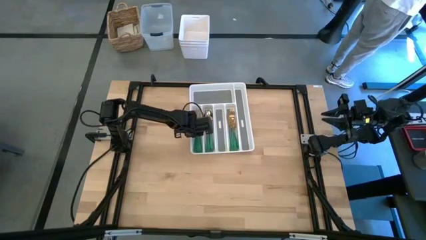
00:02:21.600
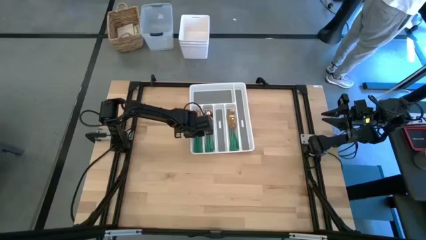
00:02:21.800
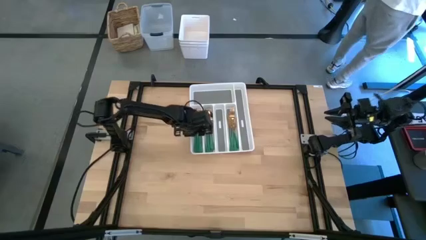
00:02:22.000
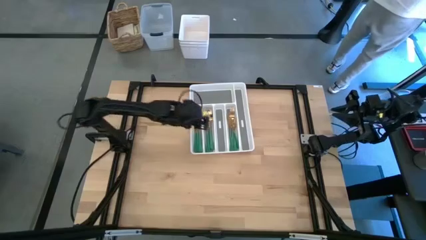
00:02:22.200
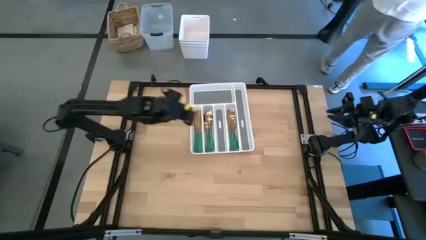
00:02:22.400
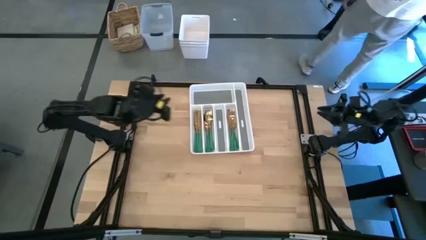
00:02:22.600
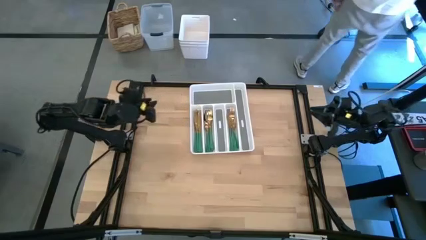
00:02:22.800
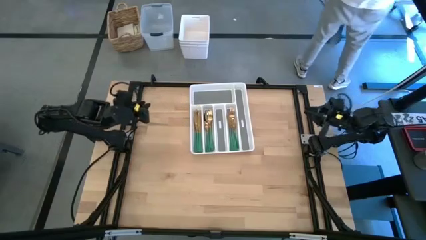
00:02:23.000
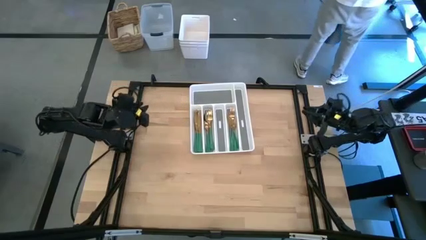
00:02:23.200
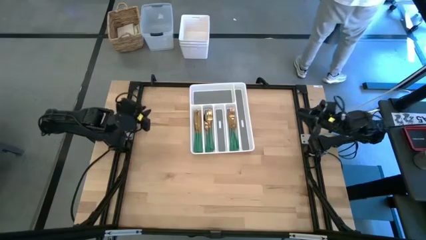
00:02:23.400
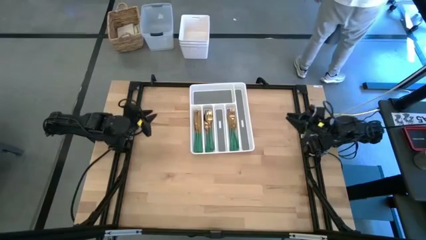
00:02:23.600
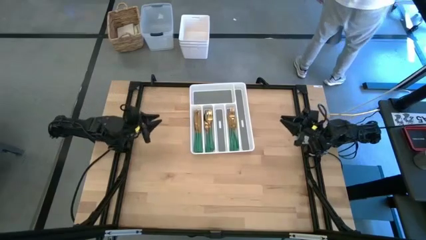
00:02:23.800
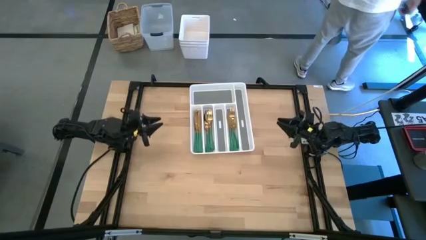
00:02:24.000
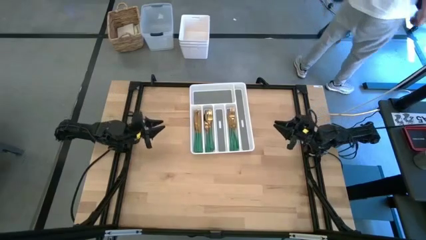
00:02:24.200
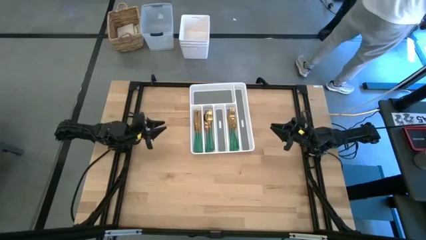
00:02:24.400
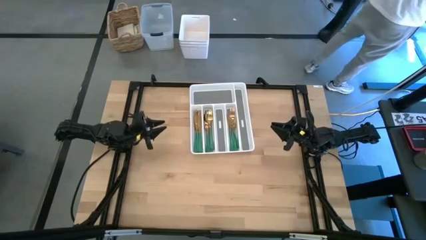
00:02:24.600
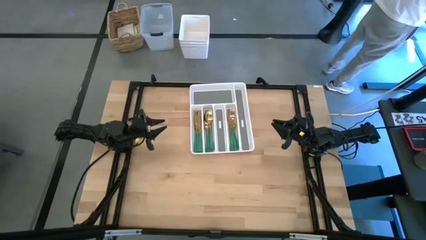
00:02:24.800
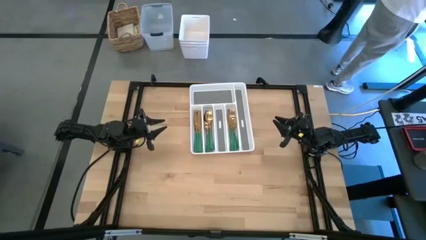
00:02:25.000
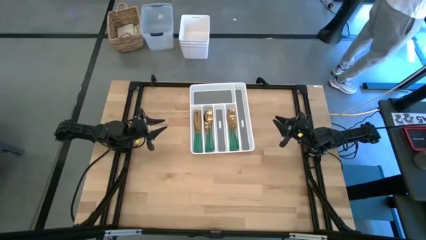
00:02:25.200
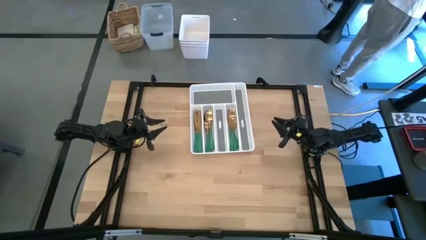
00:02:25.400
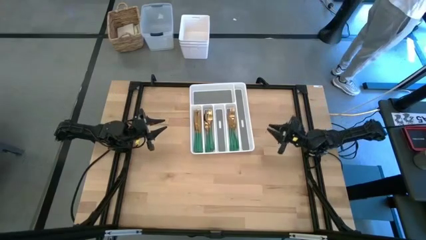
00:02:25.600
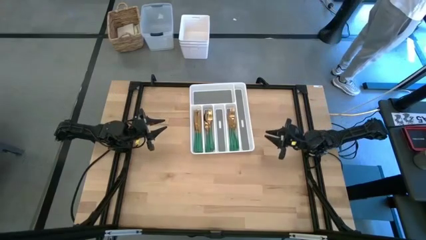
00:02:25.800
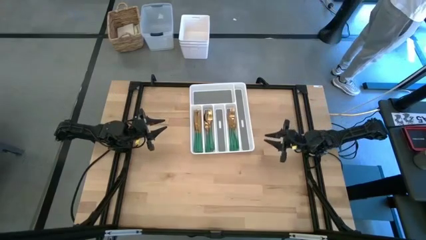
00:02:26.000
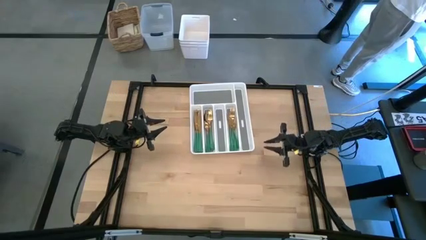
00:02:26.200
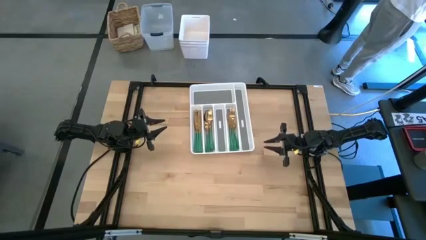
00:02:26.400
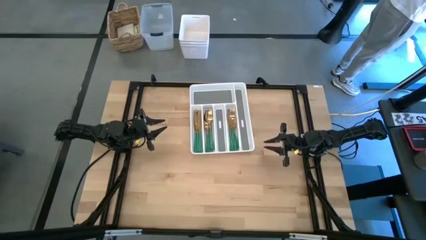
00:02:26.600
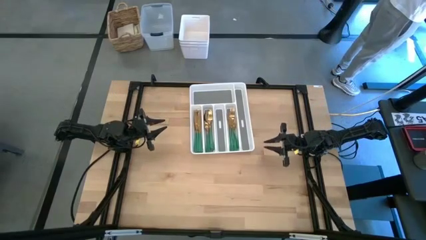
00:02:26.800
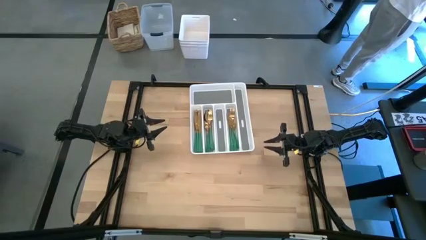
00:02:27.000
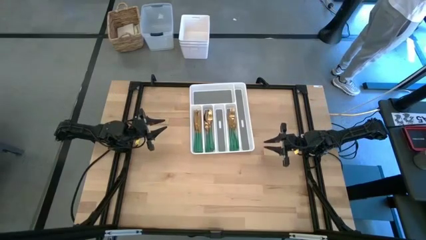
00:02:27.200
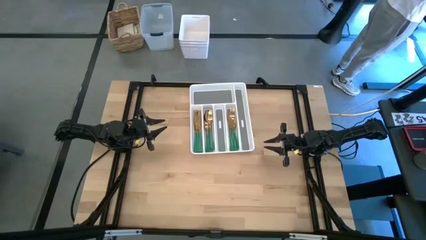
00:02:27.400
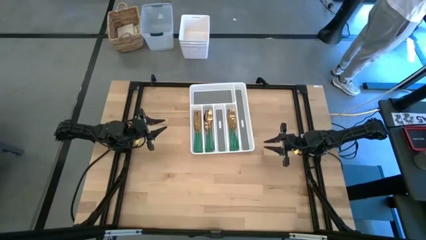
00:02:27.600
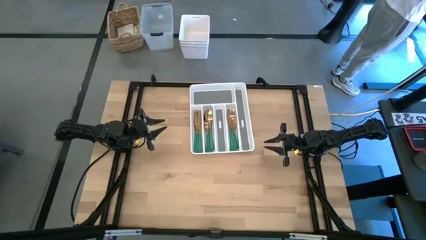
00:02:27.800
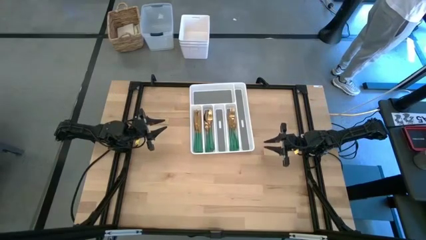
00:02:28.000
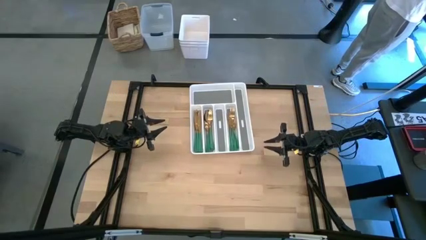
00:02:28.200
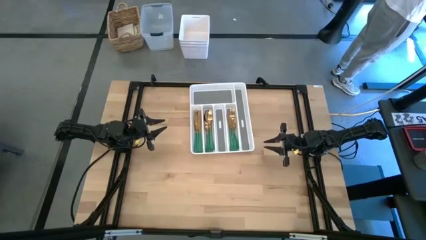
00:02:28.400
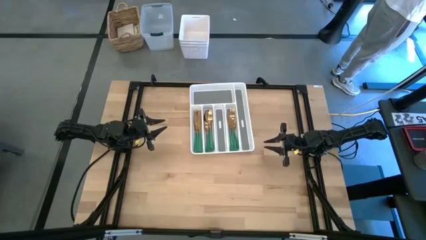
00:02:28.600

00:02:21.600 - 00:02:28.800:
Task: Sort silverware
Return to Home Position

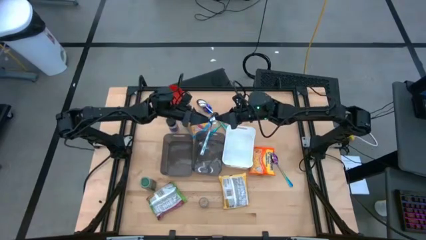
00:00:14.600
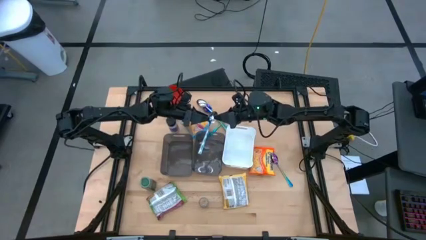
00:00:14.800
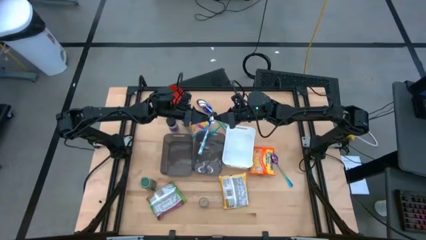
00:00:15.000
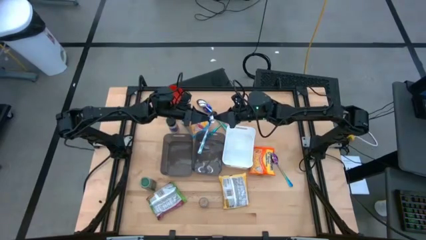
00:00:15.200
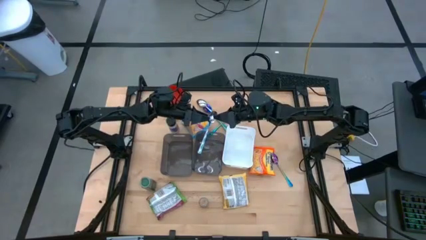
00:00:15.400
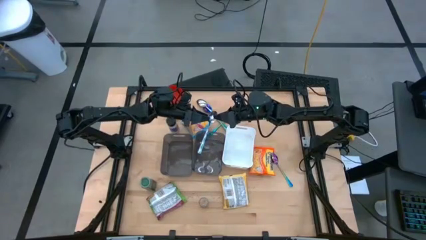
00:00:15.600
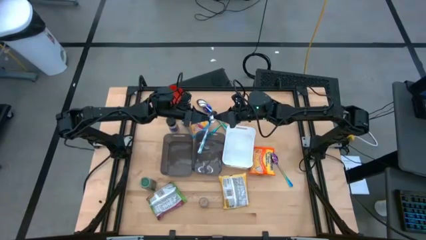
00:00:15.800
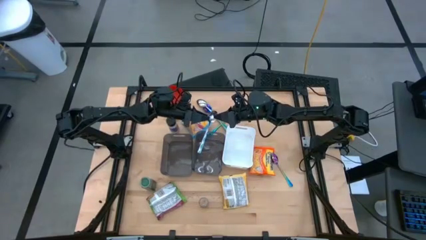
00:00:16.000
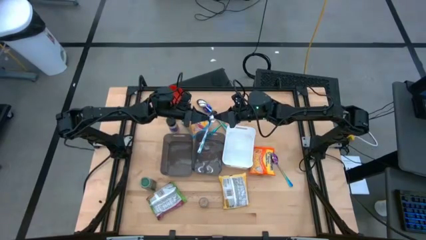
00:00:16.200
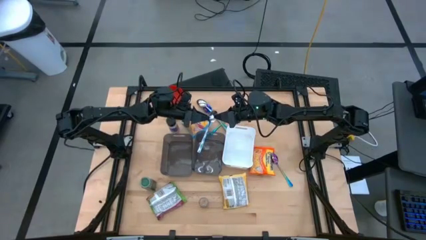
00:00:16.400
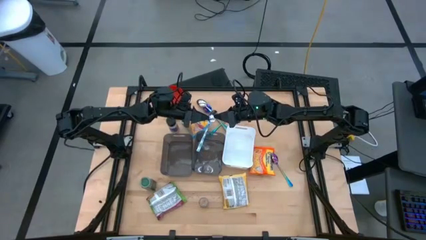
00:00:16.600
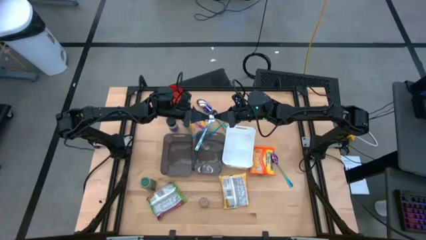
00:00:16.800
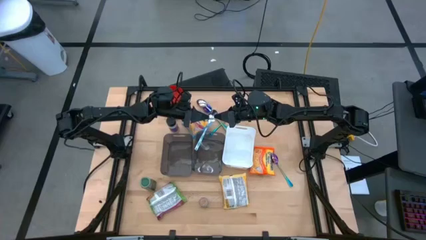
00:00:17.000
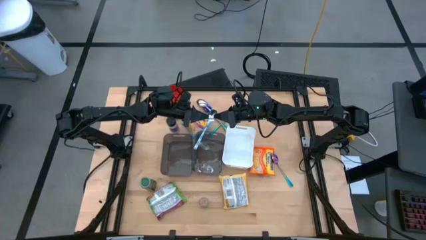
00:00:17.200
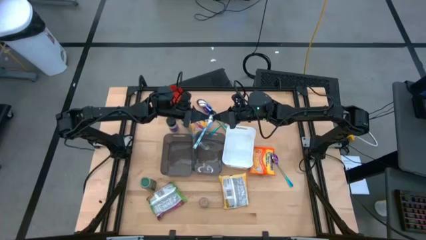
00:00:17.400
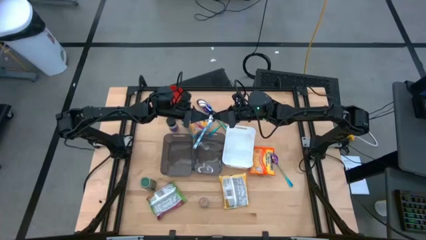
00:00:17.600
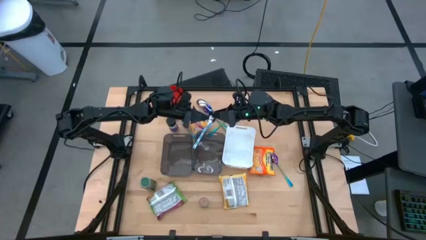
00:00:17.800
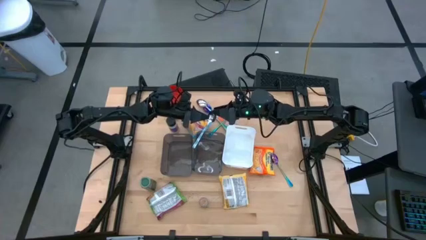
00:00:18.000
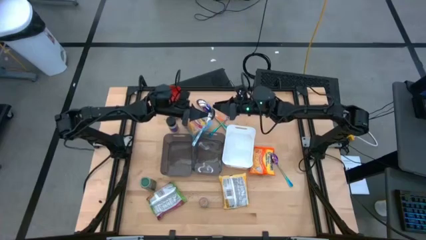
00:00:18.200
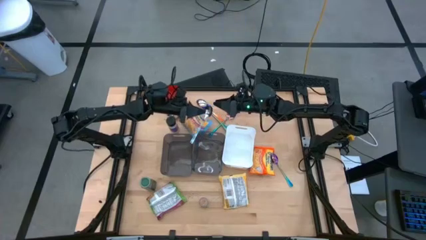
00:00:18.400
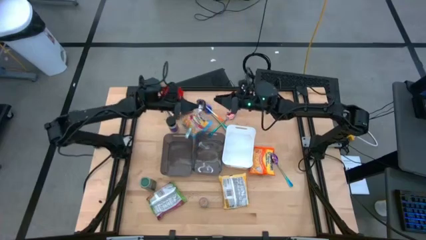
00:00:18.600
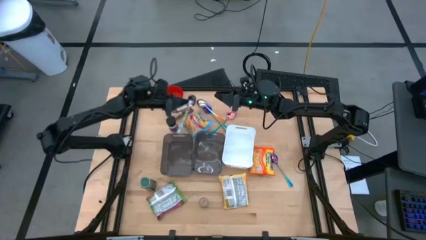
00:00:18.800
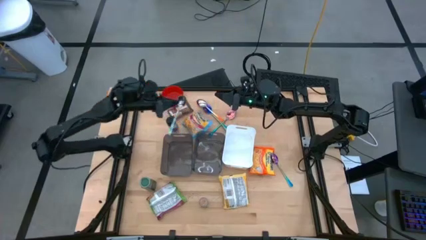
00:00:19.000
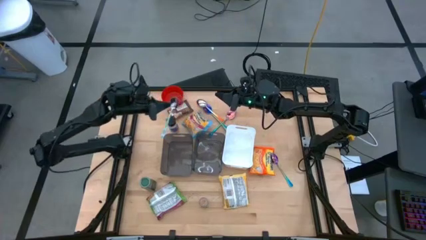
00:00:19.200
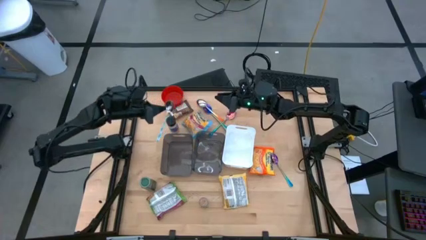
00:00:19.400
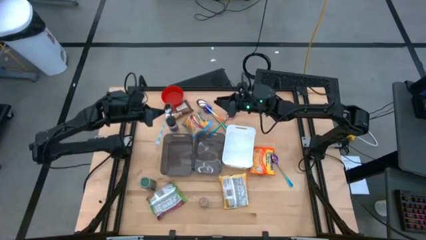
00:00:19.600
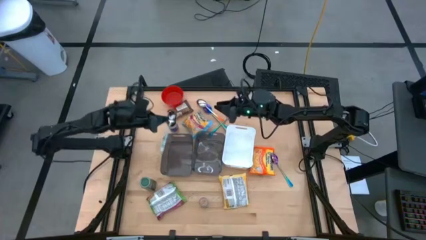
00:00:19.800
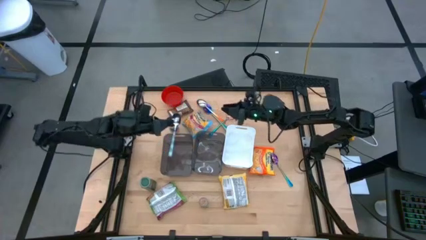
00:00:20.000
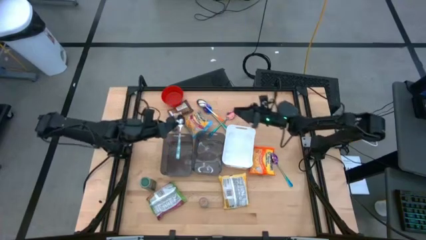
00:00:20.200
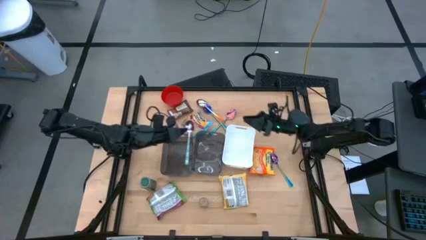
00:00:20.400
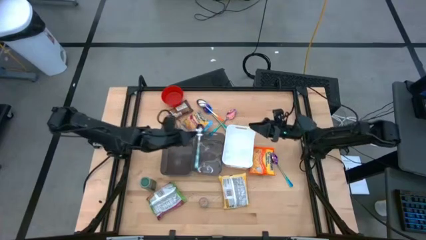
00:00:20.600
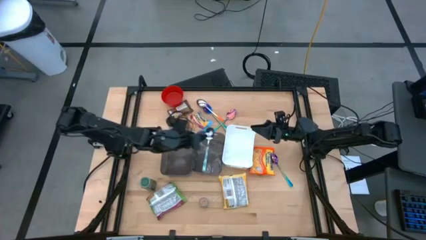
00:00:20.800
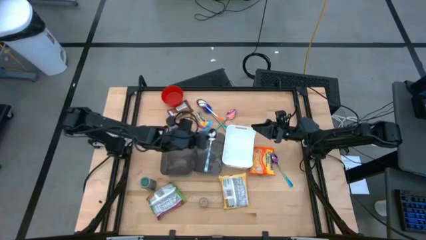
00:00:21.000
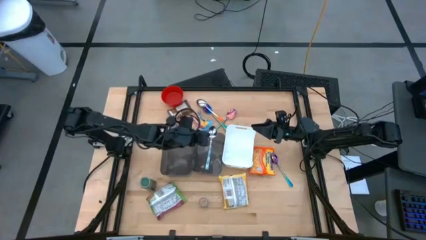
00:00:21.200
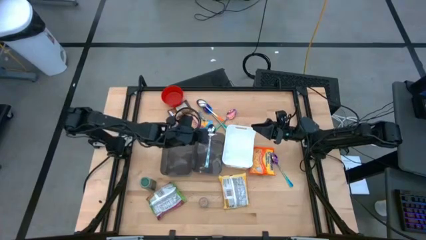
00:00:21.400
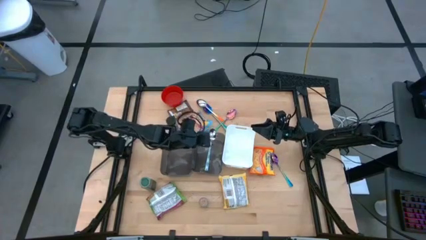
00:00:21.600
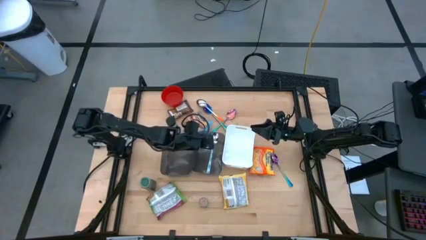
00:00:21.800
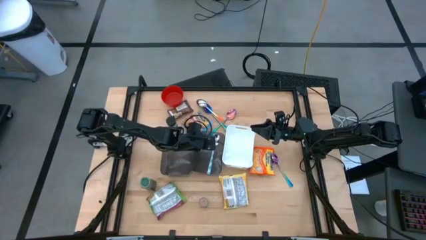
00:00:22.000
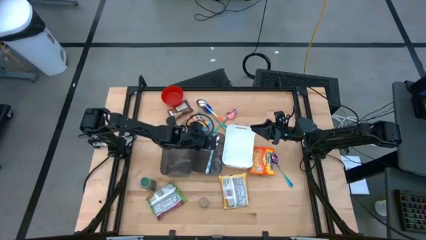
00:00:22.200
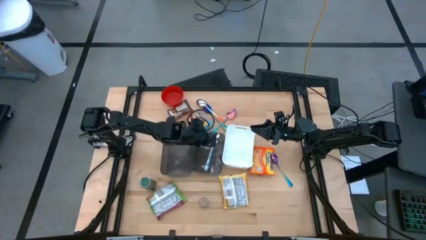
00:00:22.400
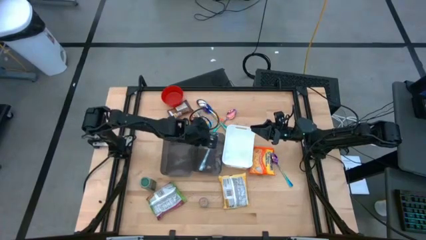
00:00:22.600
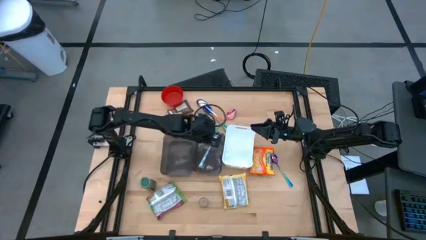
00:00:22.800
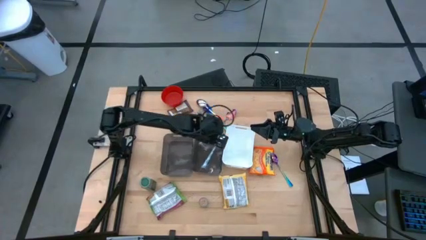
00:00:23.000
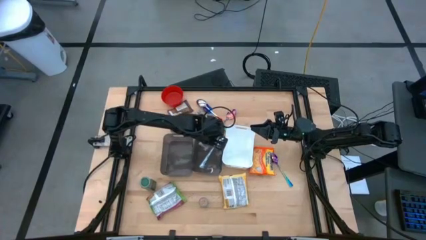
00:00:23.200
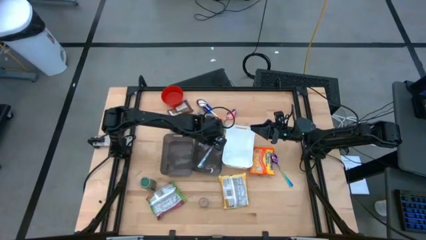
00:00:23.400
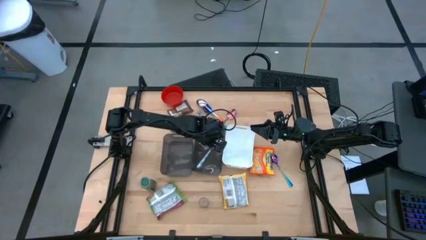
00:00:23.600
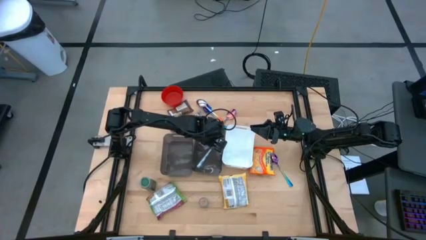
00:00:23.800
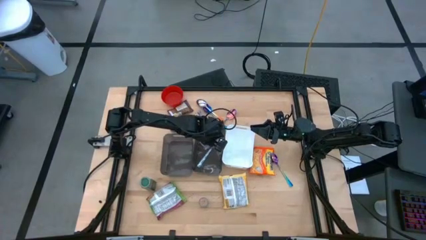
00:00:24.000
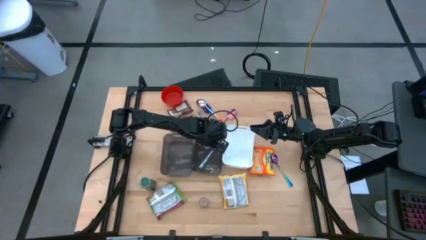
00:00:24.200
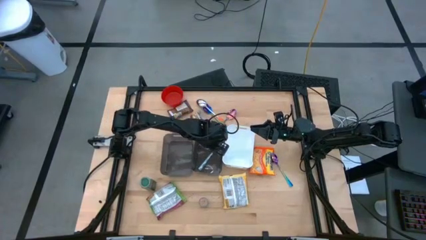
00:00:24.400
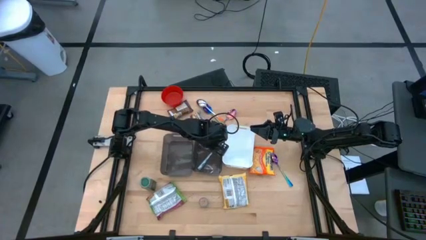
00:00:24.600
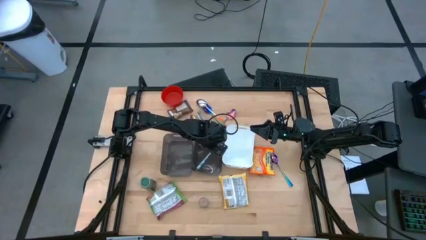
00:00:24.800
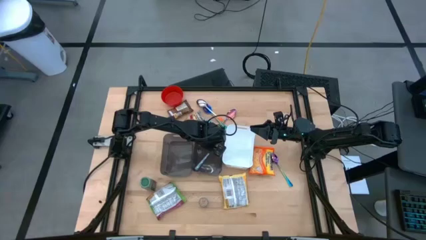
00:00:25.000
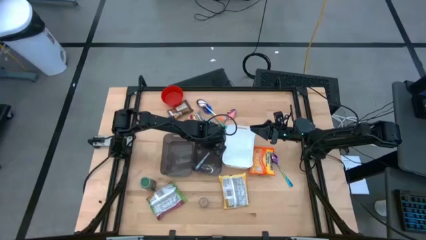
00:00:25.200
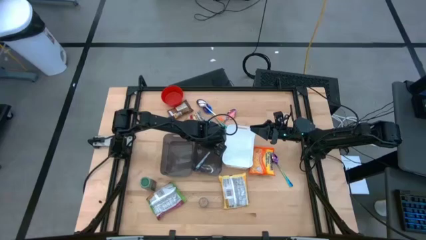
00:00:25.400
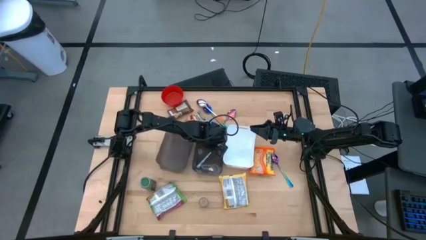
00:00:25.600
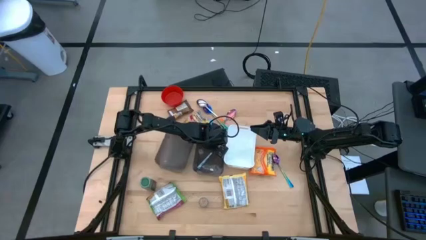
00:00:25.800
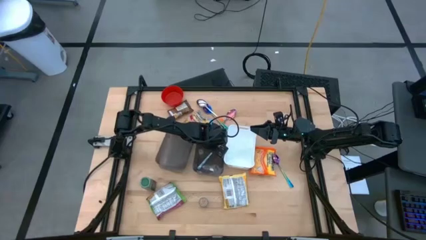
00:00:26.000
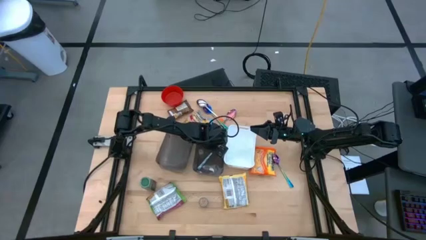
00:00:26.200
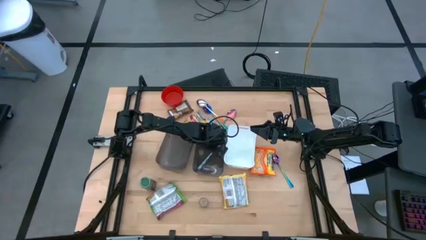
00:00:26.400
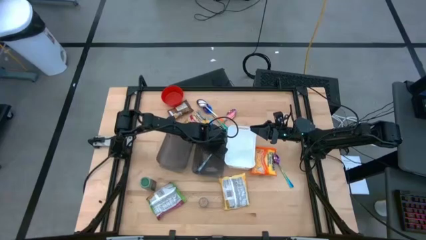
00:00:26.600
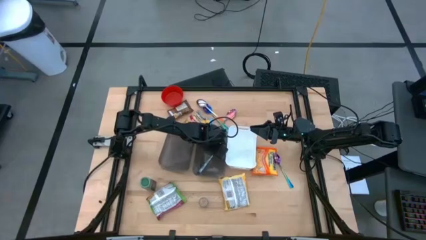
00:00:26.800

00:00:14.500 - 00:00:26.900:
Task: Pick & Place Food Item
Put the white spoon into the right gray bin
